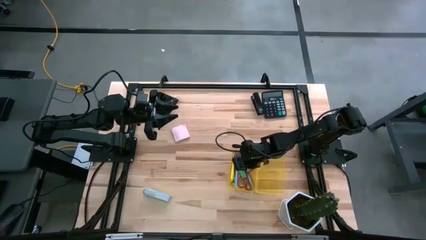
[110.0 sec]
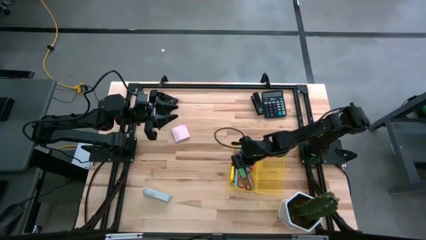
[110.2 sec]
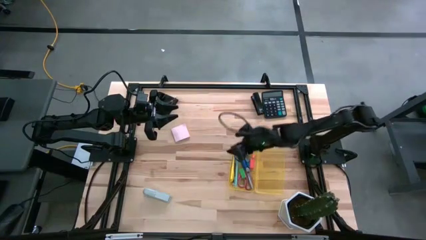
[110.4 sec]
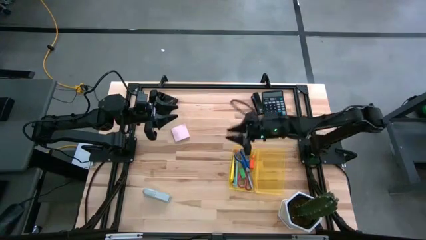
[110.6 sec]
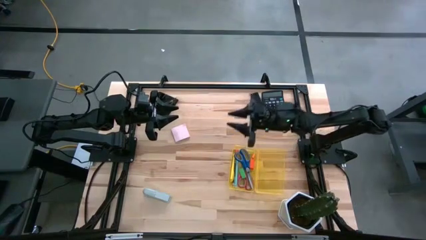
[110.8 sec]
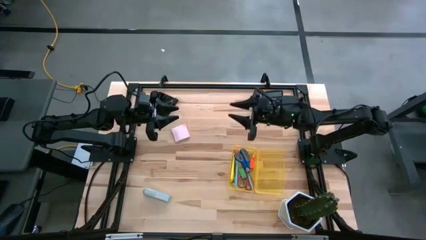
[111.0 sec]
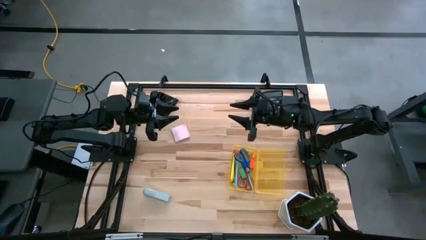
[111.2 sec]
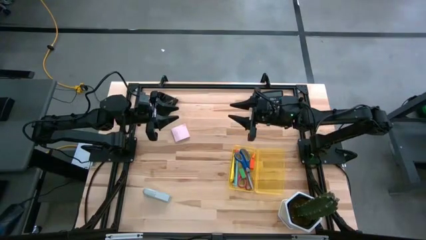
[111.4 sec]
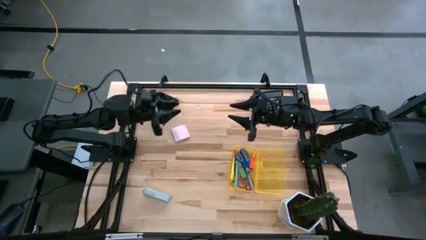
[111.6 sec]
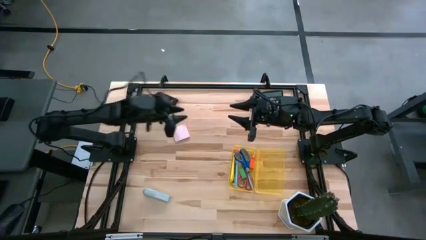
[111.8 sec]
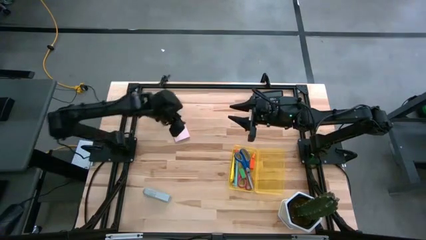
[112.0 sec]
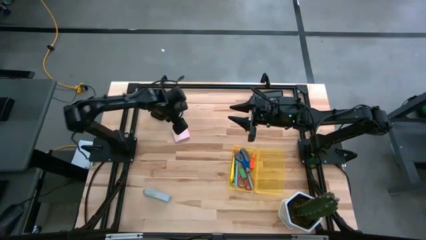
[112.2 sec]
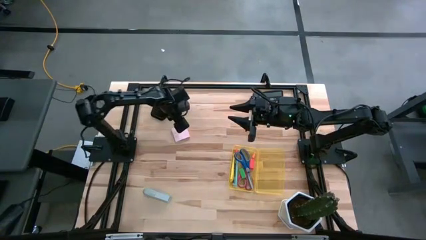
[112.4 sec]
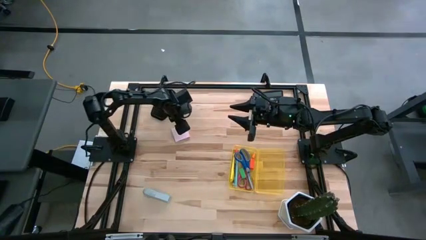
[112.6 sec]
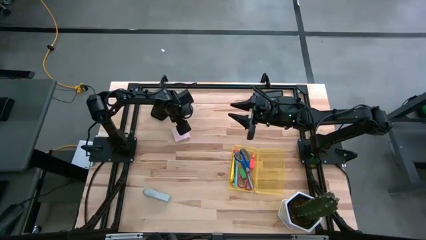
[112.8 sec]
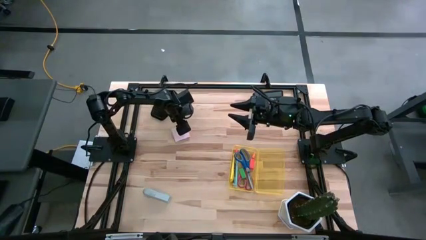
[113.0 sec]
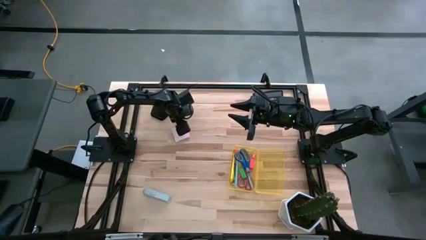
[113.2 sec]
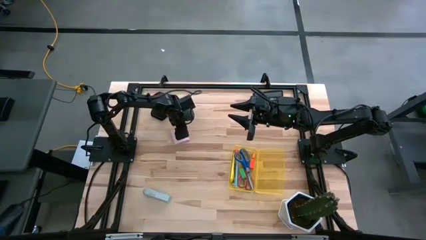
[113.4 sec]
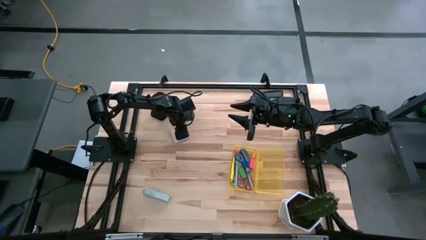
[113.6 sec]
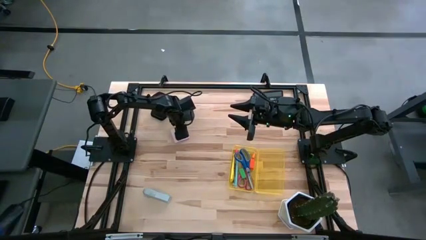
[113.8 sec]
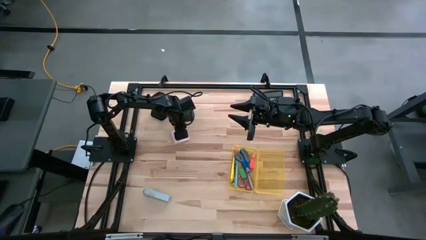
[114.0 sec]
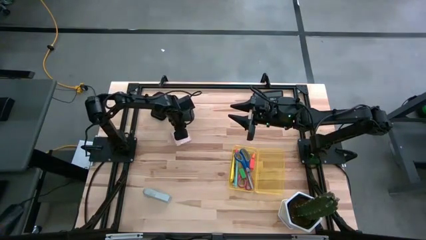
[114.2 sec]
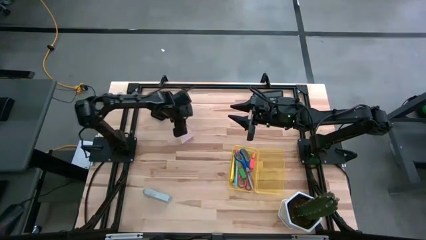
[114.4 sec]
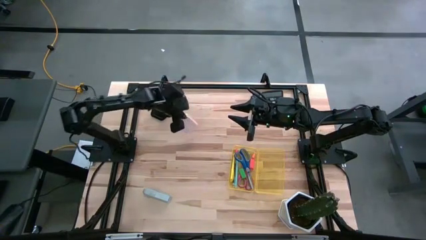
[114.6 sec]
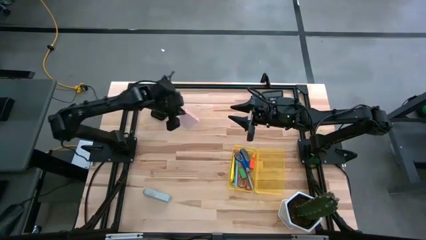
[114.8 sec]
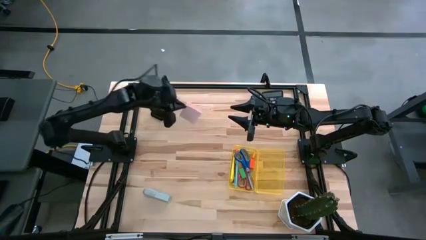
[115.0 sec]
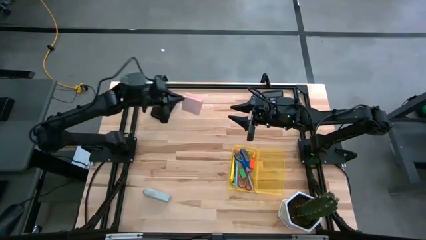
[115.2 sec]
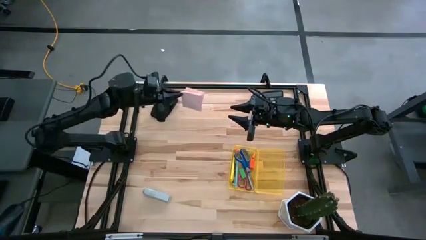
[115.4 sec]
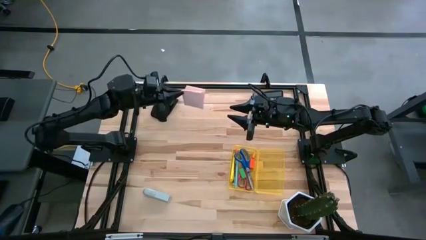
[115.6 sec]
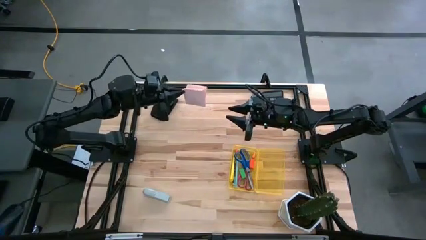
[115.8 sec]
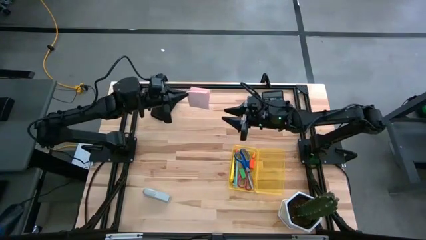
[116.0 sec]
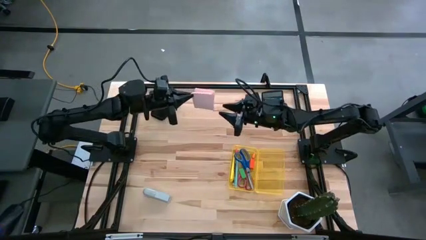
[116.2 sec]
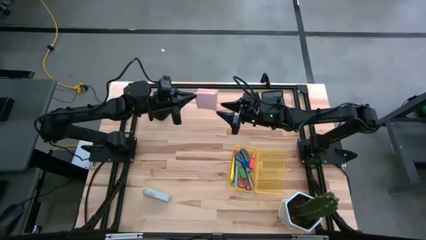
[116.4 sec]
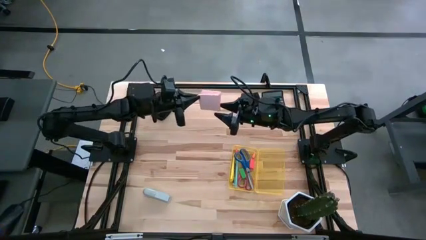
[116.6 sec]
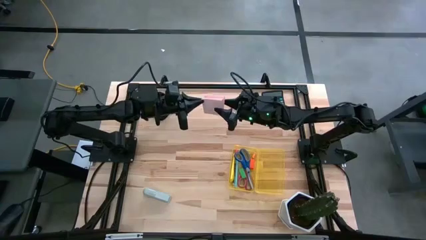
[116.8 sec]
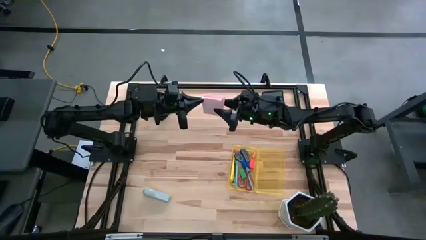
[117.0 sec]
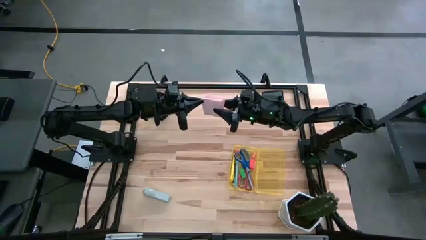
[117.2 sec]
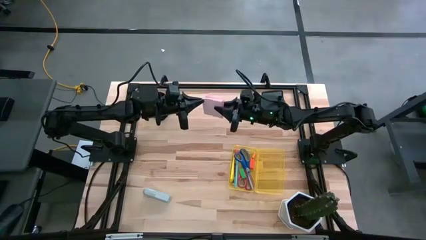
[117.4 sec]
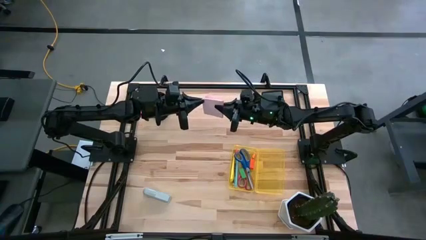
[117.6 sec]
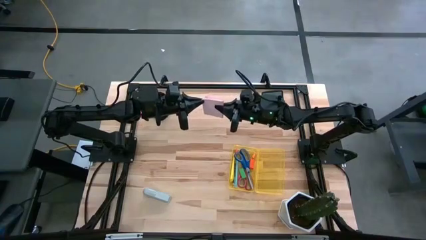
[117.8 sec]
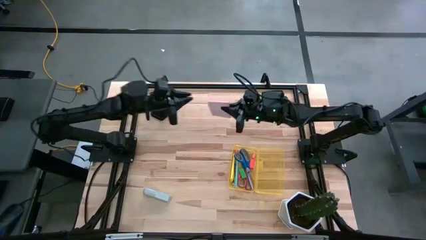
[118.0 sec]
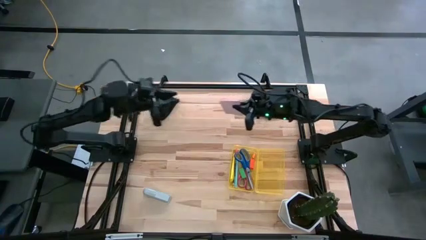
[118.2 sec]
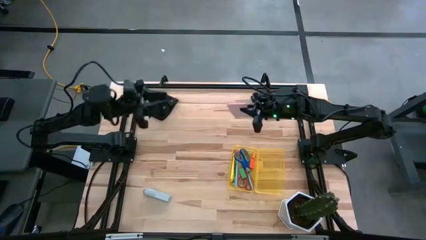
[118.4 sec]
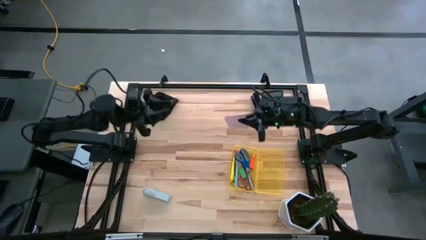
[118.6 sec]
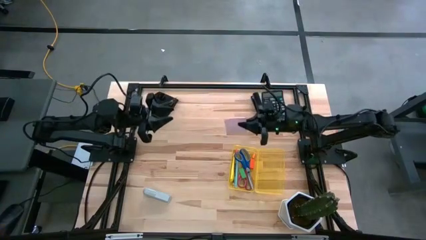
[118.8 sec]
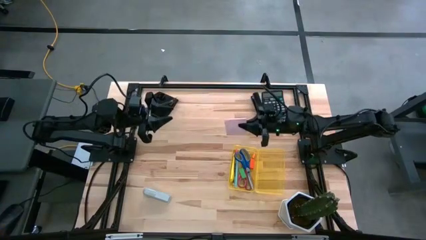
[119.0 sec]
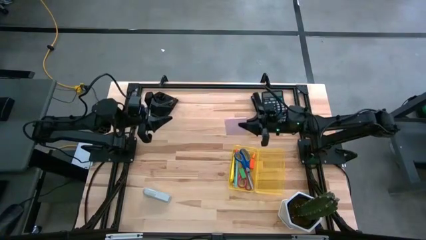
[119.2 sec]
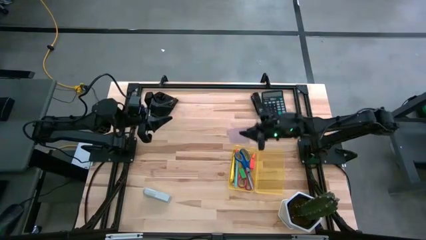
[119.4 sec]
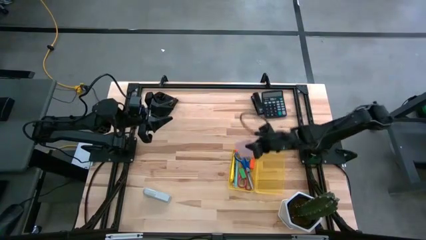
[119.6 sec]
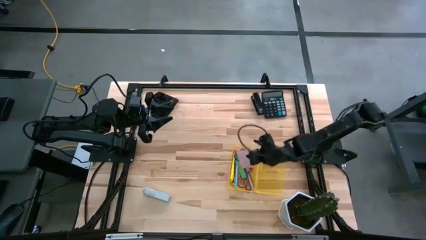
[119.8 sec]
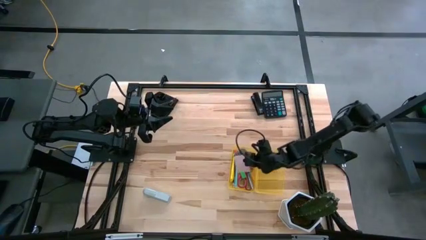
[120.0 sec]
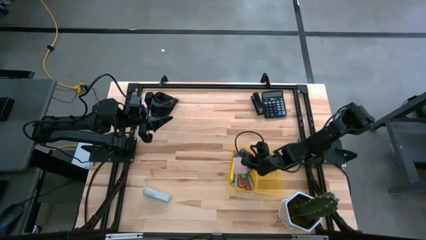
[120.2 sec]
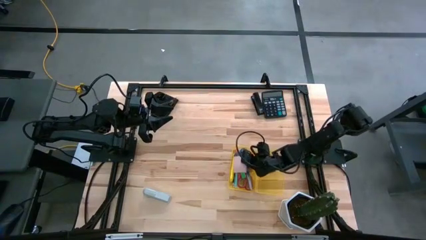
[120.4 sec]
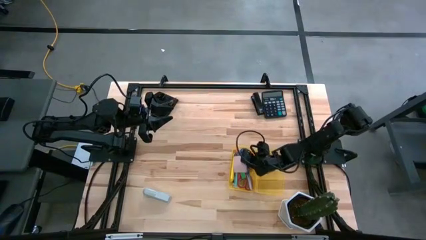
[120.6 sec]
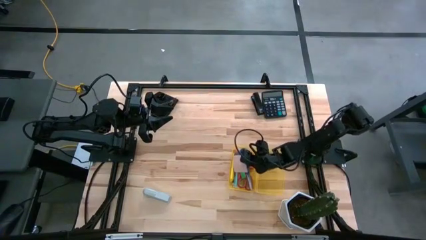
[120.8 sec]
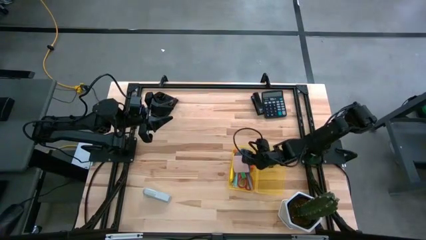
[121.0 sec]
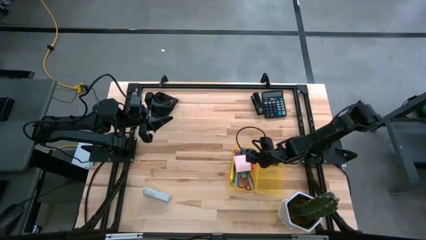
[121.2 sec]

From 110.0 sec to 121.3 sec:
Task: Pack school essentials
Put the sticky notes into the supply box
